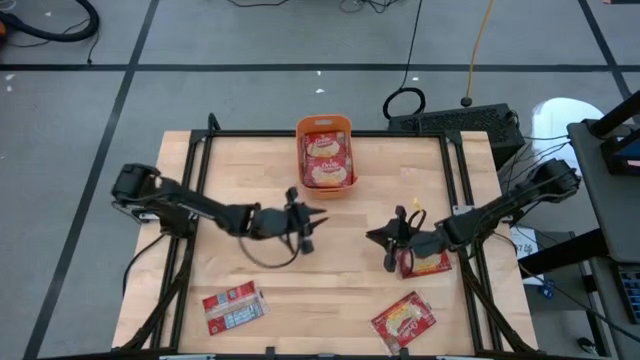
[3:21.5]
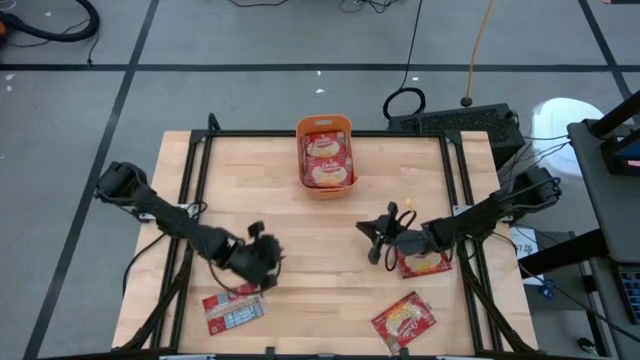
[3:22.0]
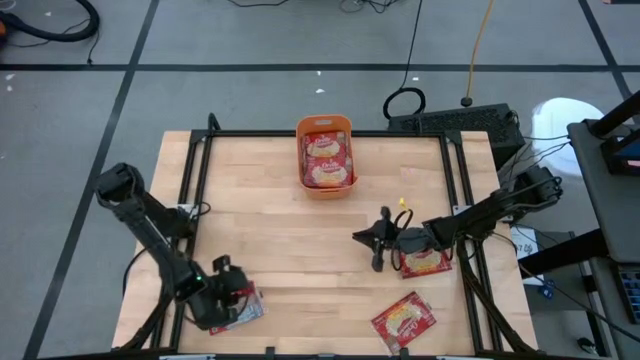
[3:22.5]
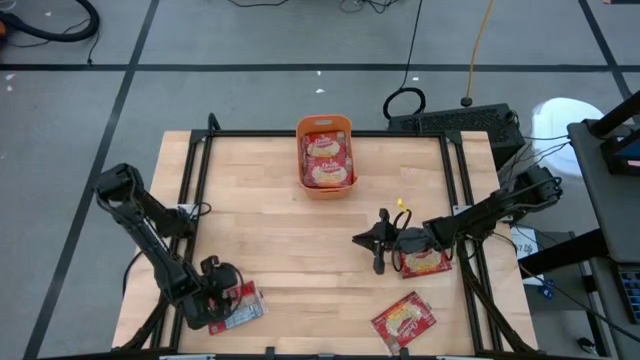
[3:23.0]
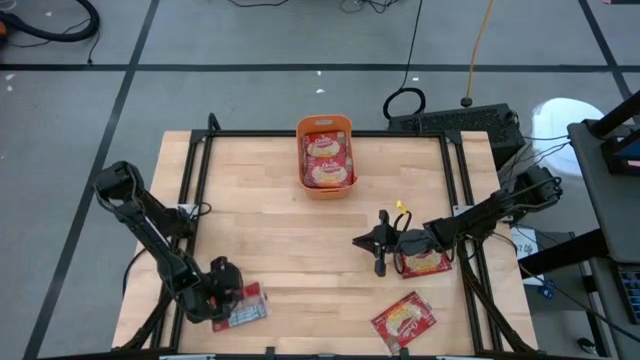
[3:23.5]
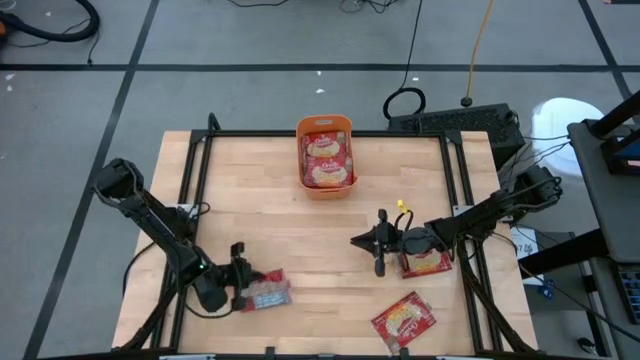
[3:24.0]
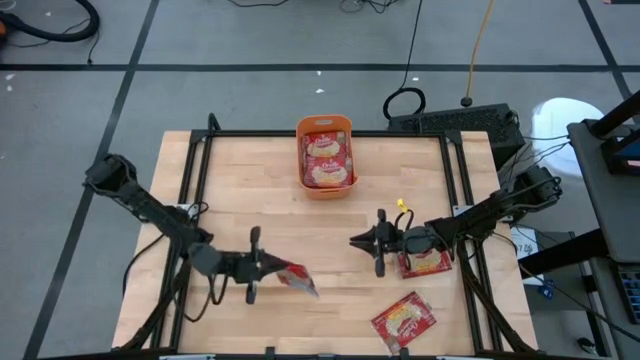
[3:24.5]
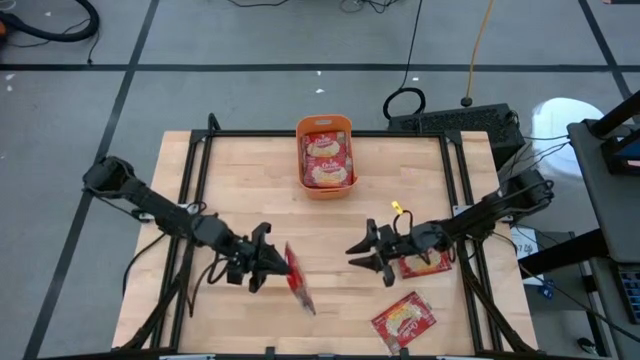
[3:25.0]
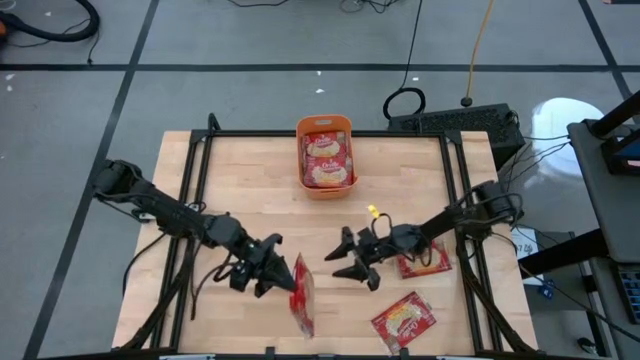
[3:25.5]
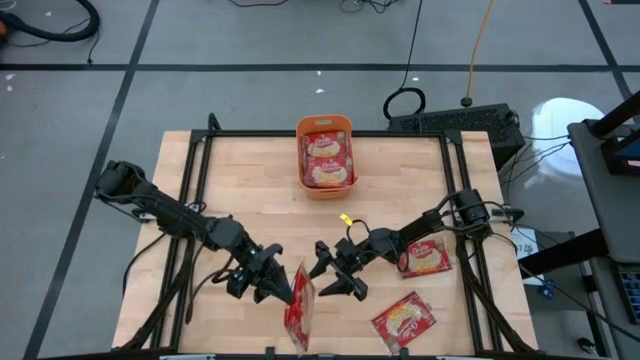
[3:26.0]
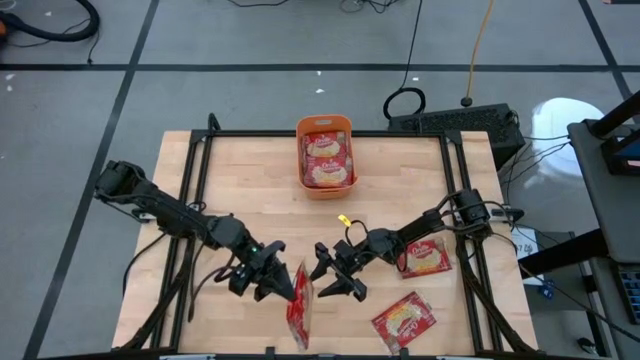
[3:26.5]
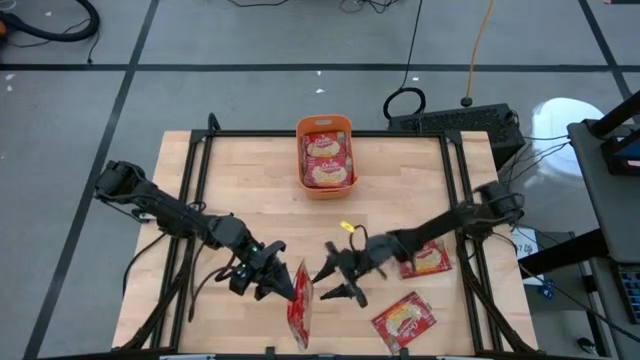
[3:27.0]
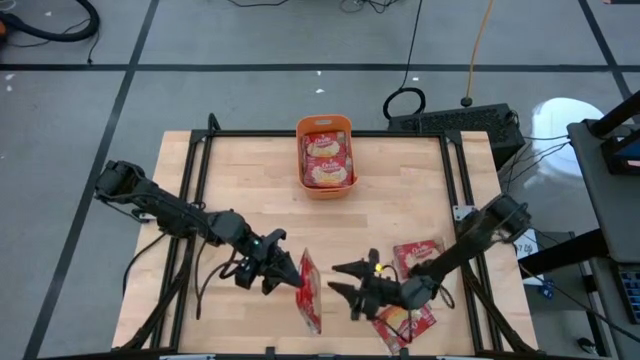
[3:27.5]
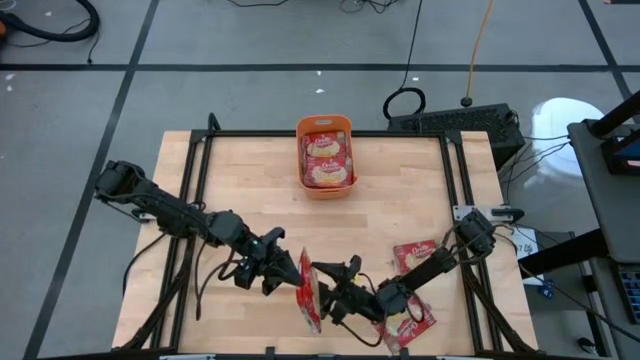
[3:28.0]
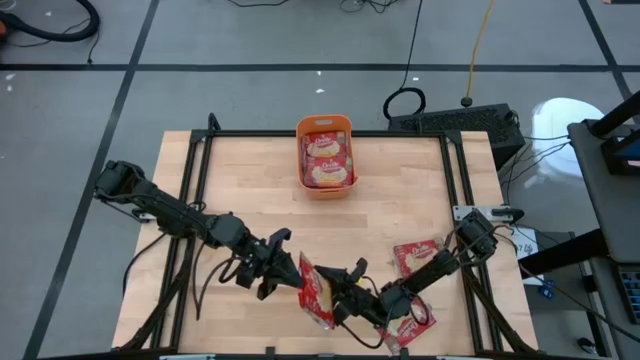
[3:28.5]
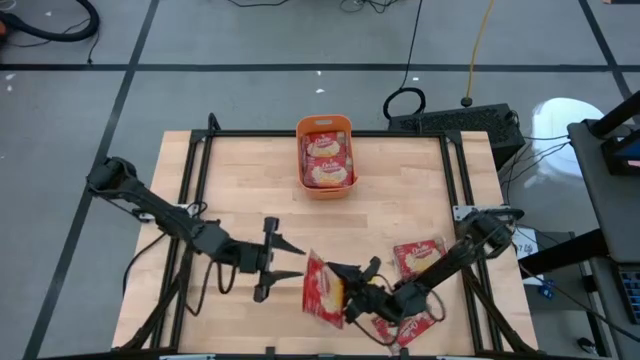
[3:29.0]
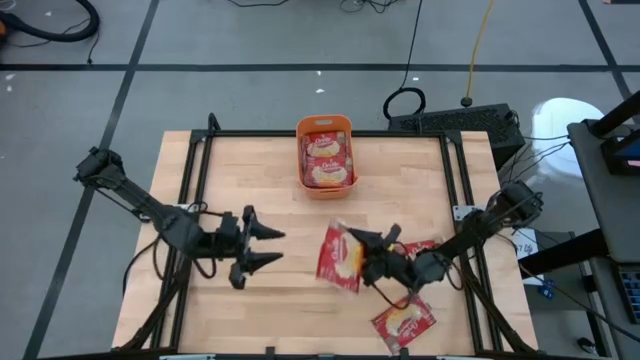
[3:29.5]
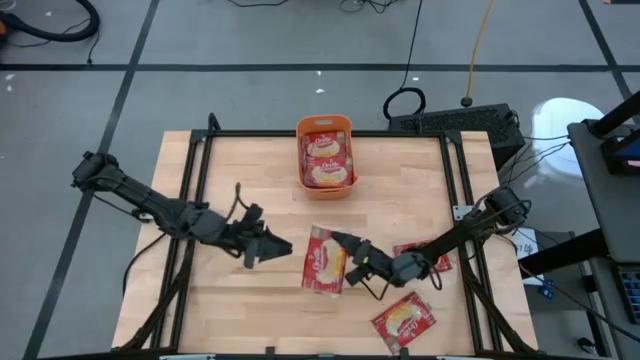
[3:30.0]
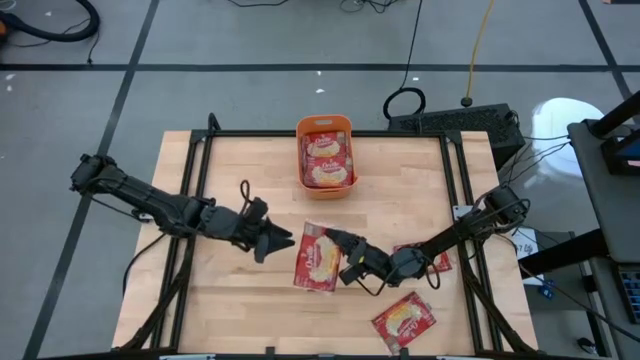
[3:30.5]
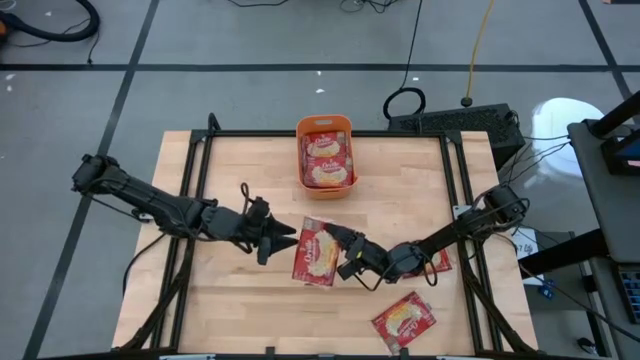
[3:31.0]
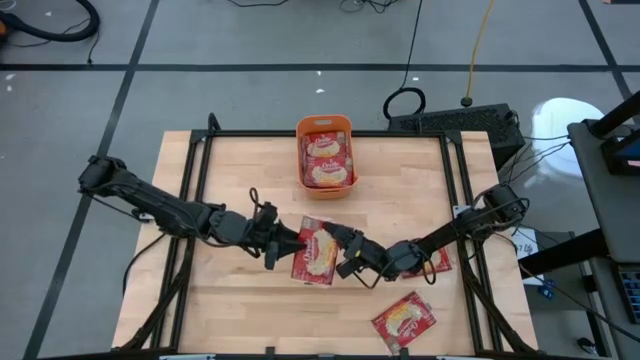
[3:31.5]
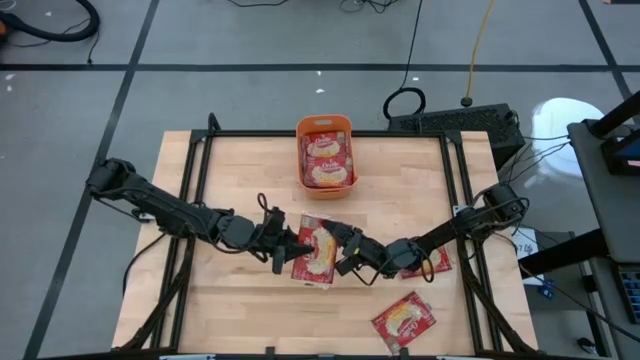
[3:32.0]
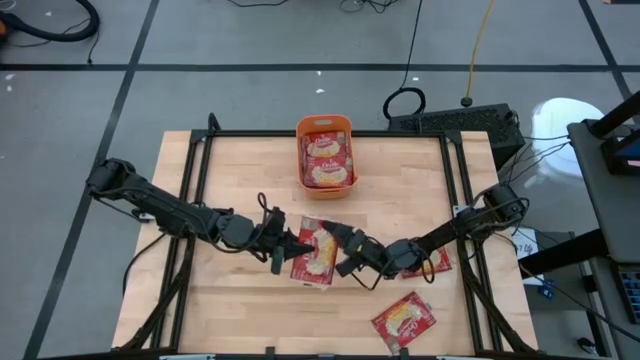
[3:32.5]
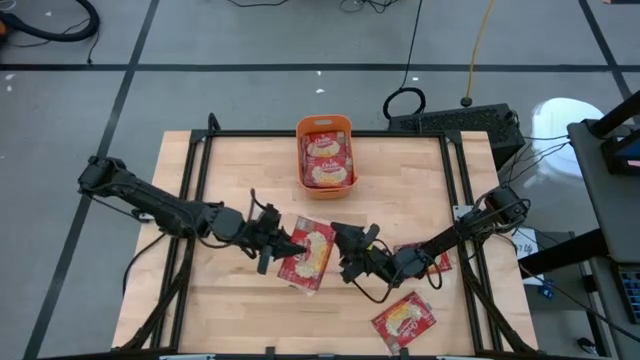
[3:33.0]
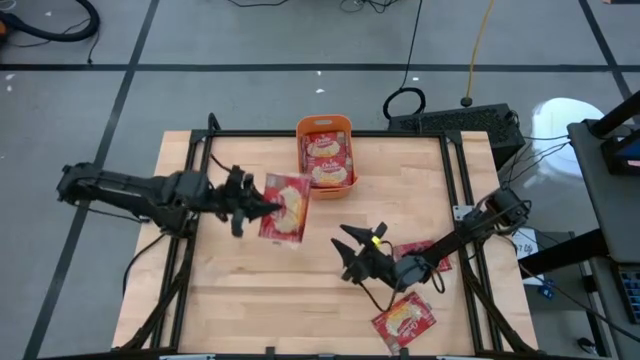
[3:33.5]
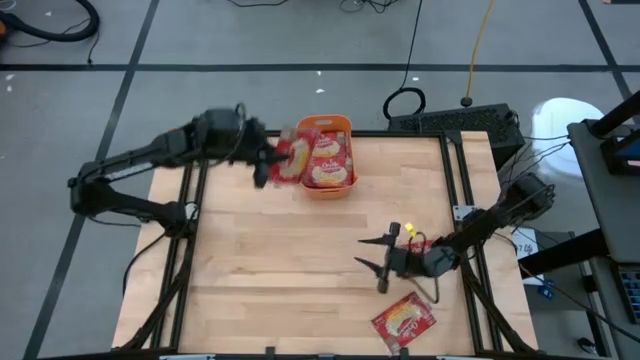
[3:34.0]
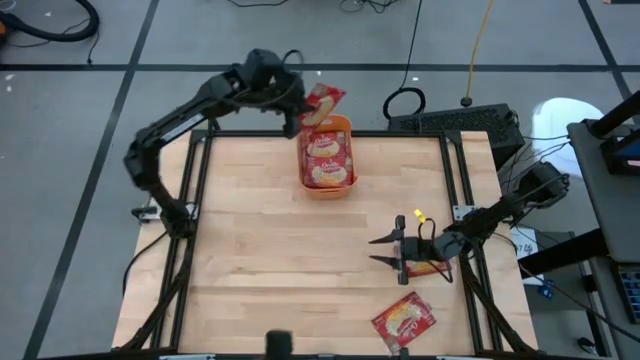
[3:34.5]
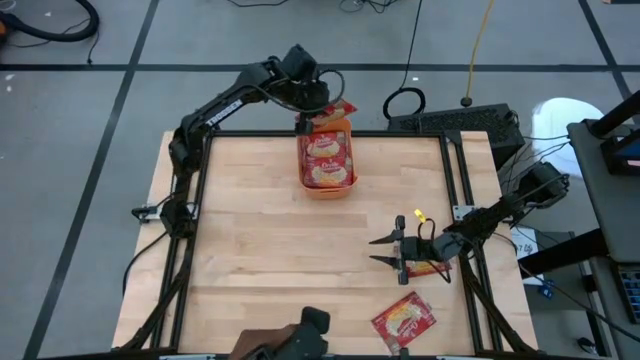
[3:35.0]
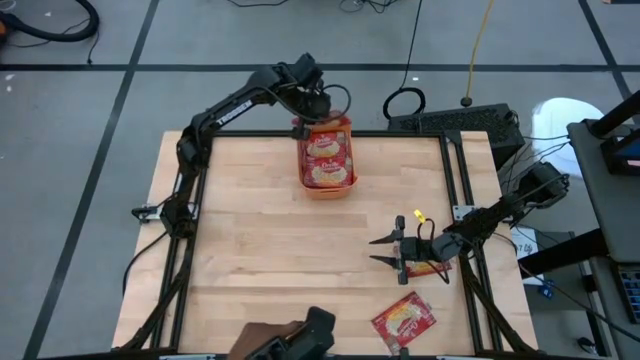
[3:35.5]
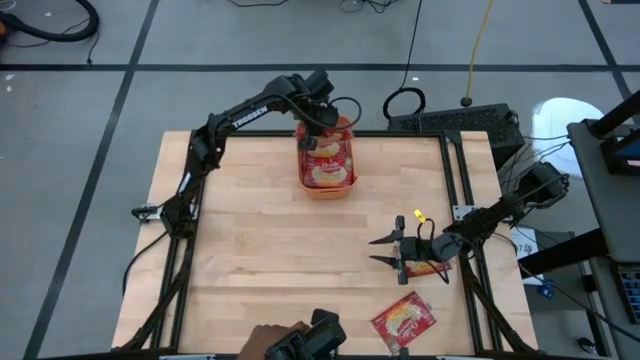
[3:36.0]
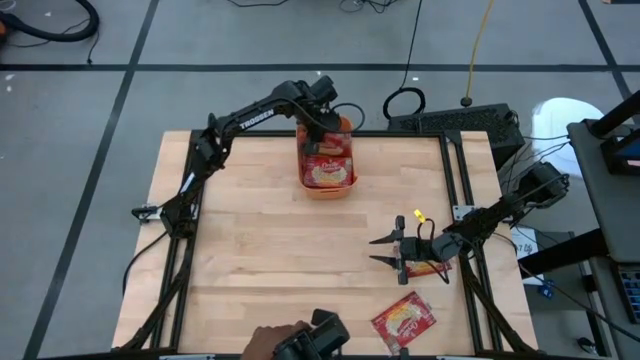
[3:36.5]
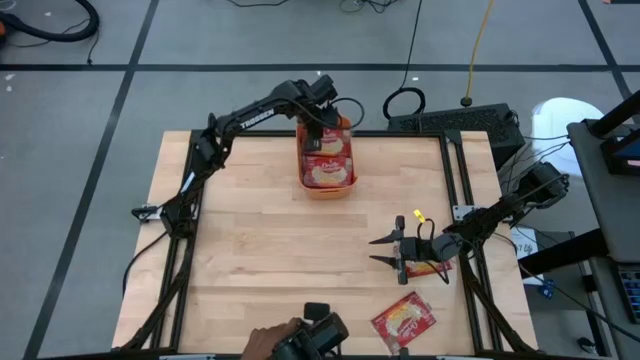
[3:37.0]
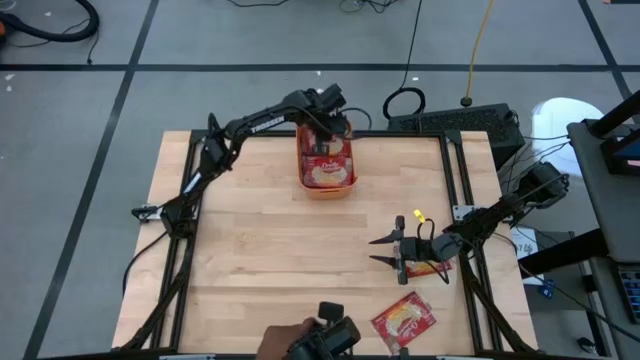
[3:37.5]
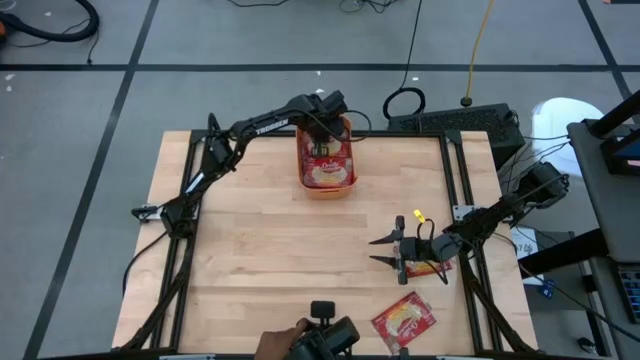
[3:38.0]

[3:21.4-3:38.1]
Task: Sort popcorn bags into baskets
Put the bottom left red popcorn bag into the orange bin

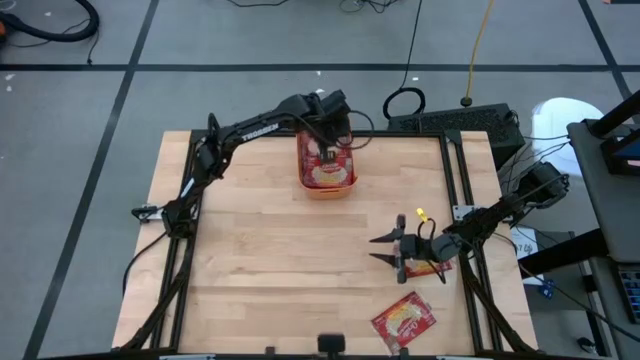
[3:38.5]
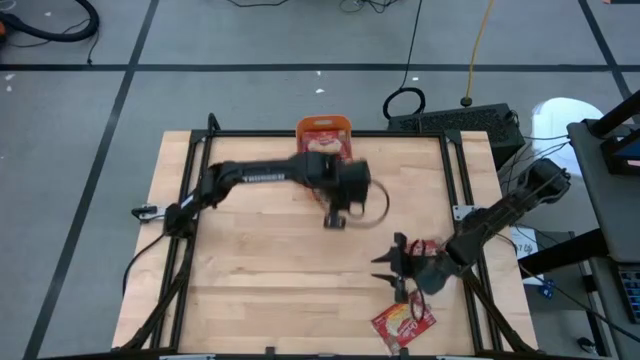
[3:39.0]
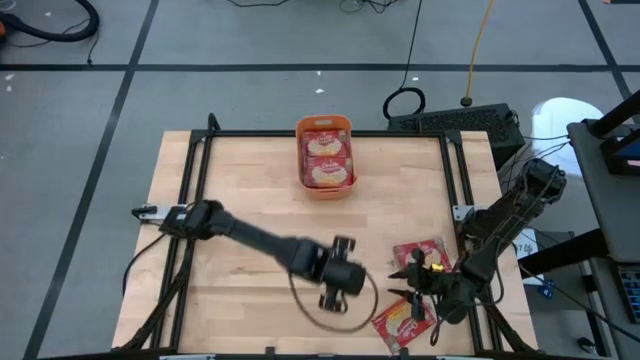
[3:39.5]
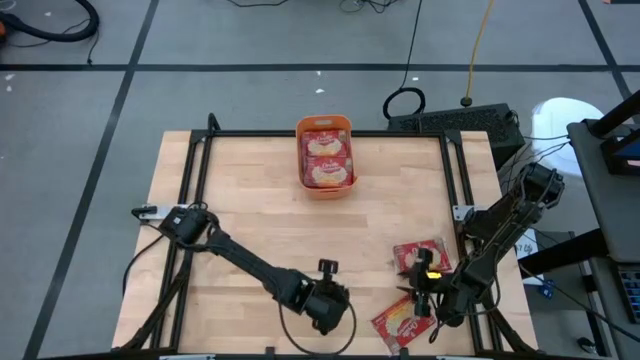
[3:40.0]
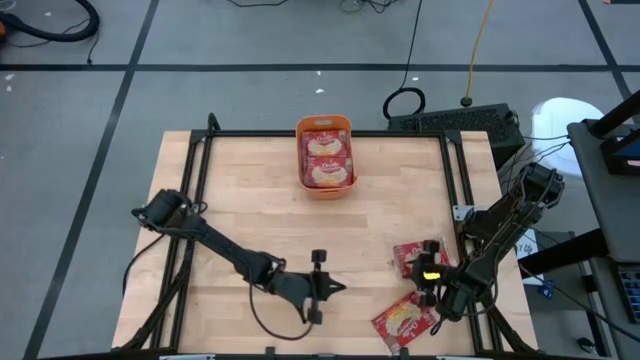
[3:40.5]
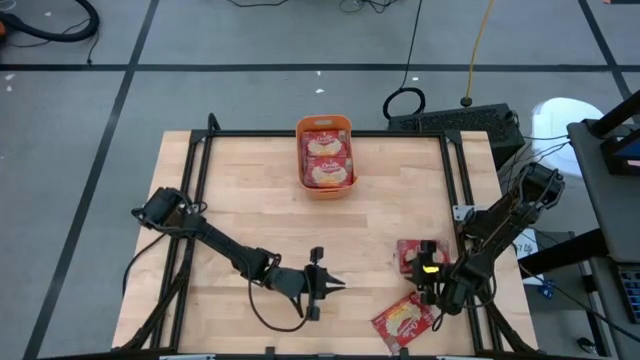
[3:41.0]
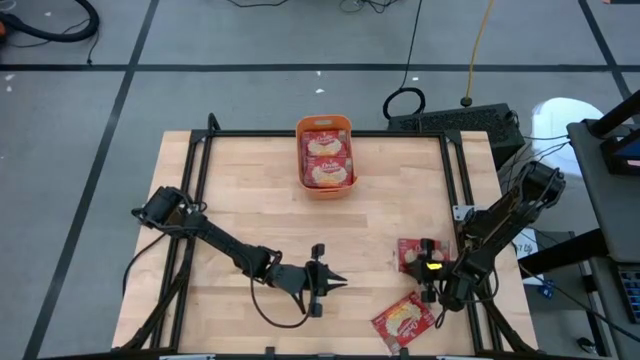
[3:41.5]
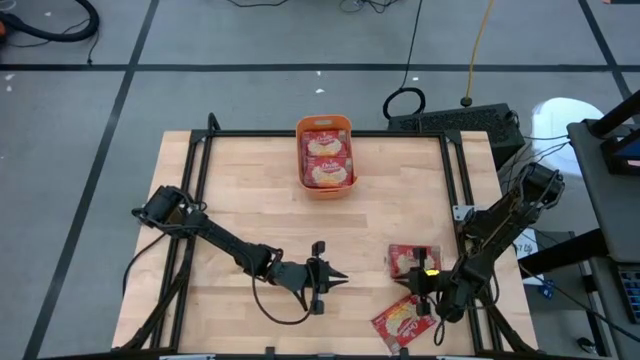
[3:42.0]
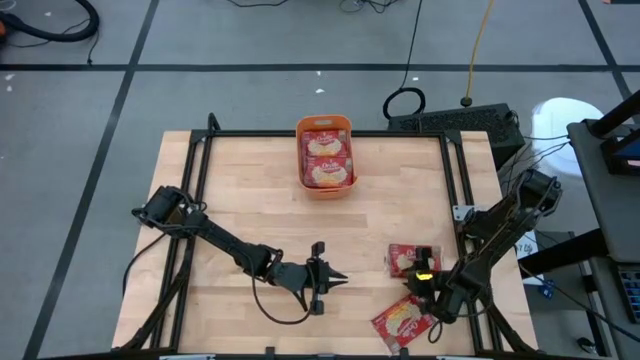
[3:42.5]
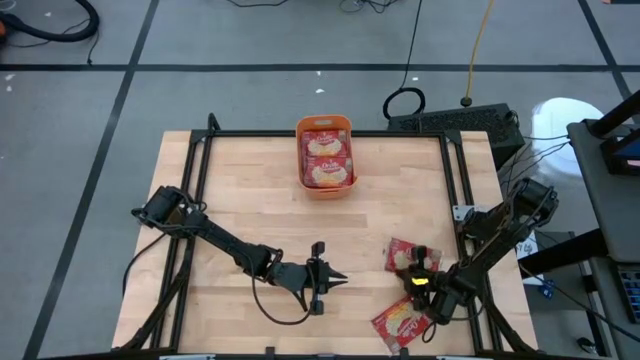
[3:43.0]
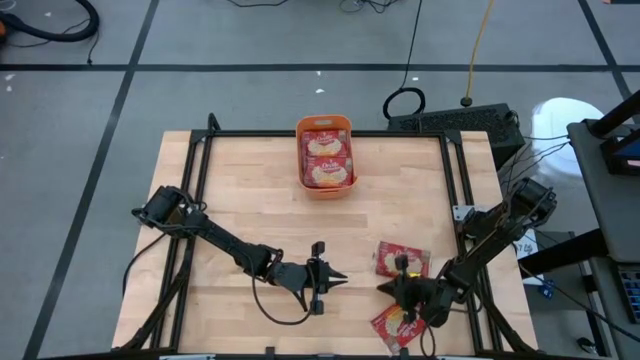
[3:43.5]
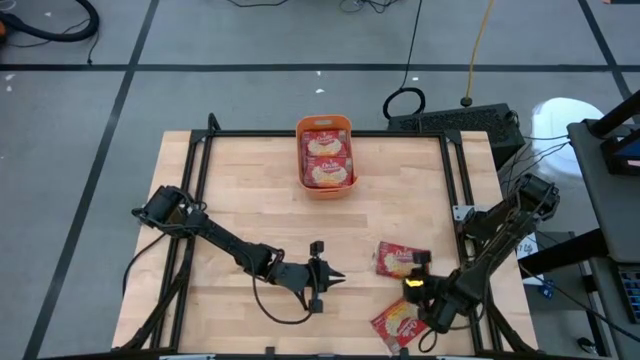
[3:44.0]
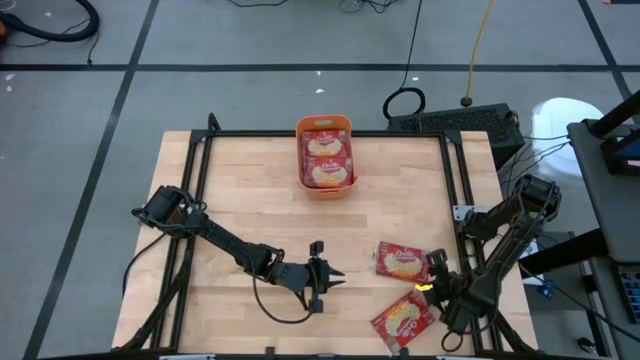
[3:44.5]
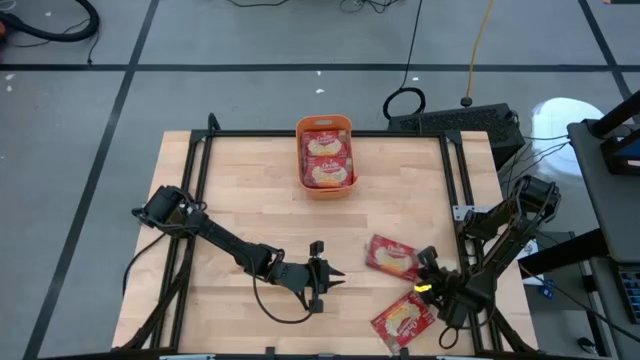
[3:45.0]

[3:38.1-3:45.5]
Put the top red popcorn bag into the orange bin
